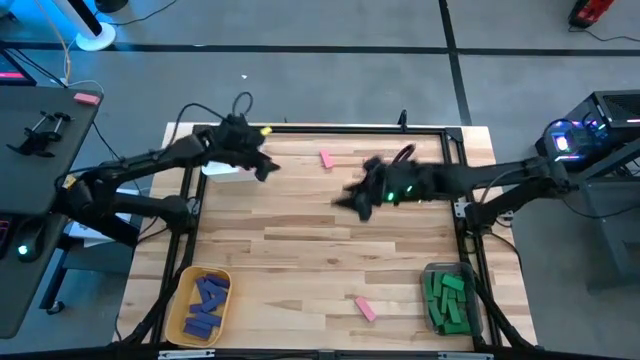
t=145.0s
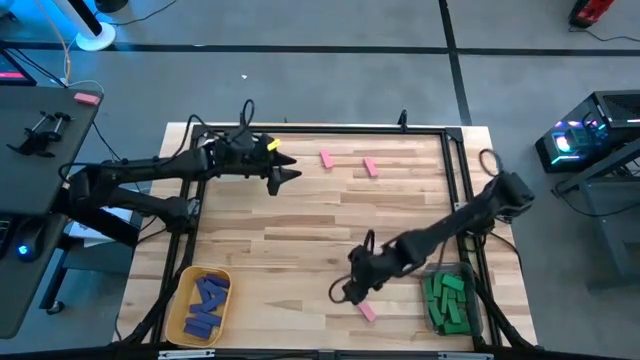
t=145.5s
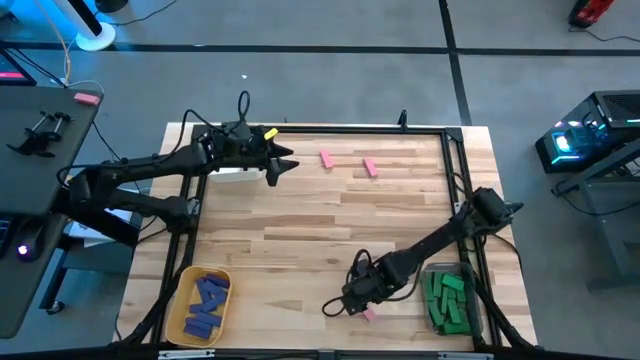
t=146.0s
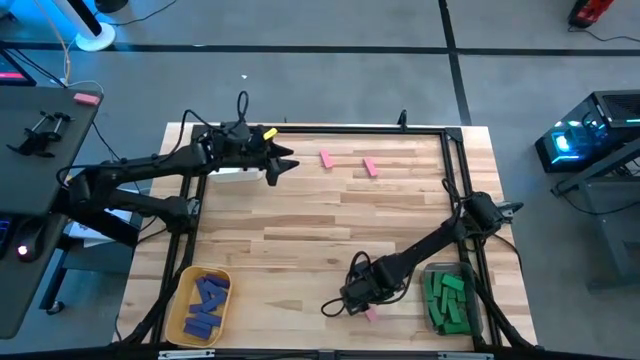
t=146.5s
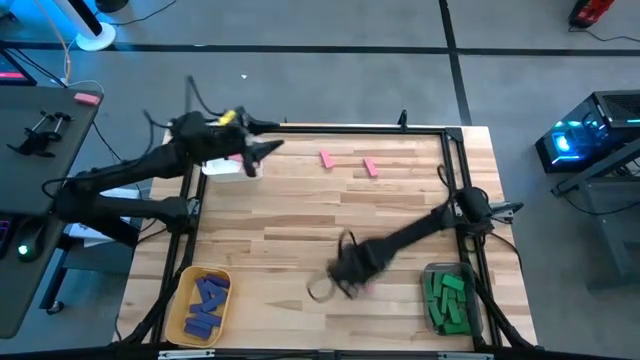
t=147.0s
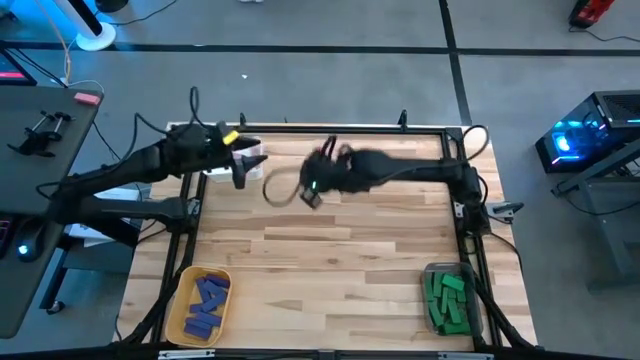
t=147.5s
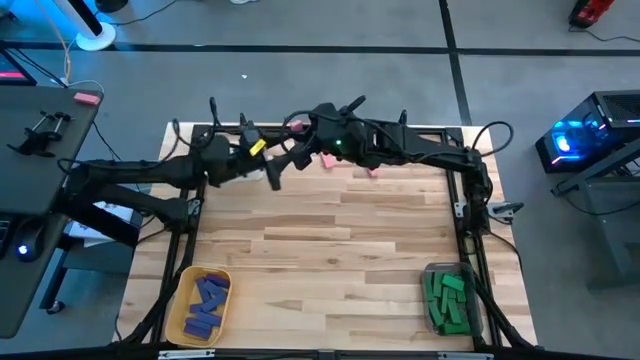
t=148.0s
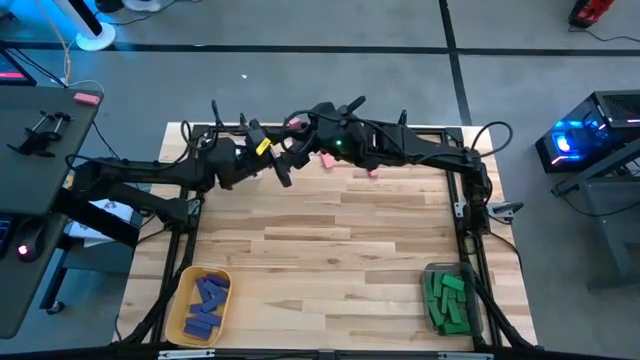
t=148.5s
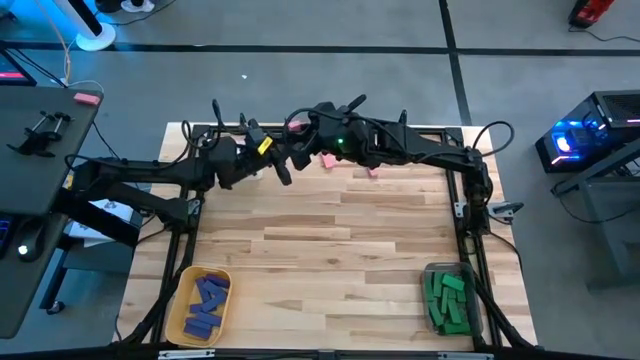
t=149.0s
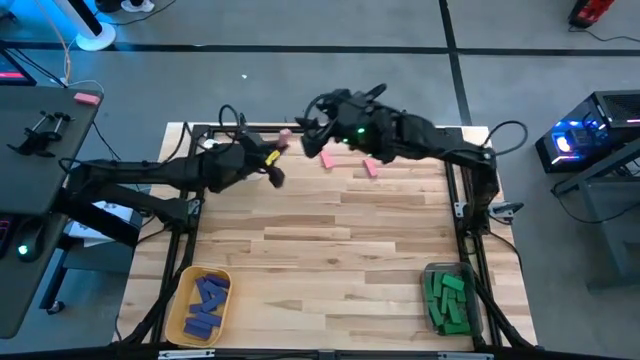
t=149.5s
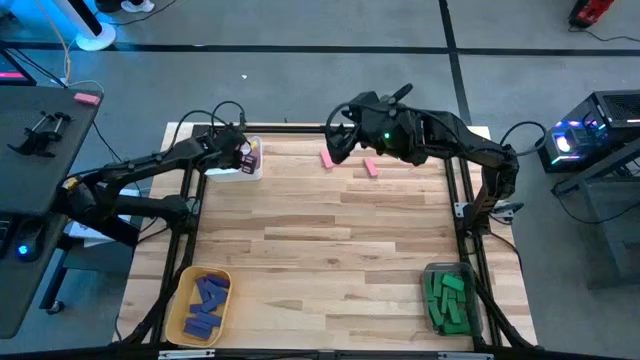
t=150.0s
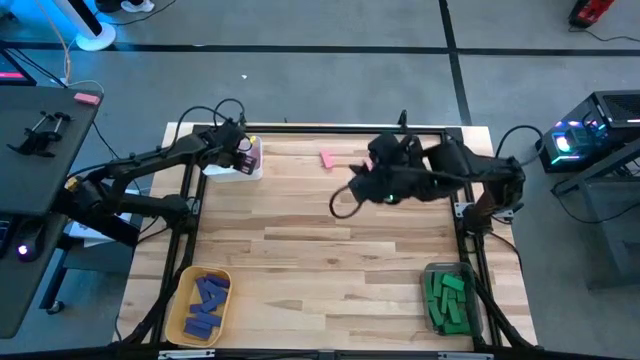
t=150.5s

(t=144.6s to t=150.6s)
Task: Sort blocks
Put the pink block into the white bin

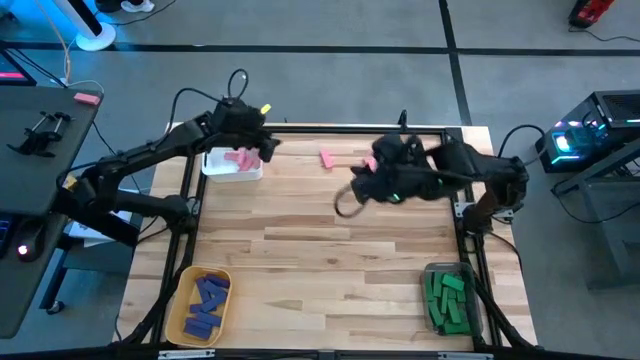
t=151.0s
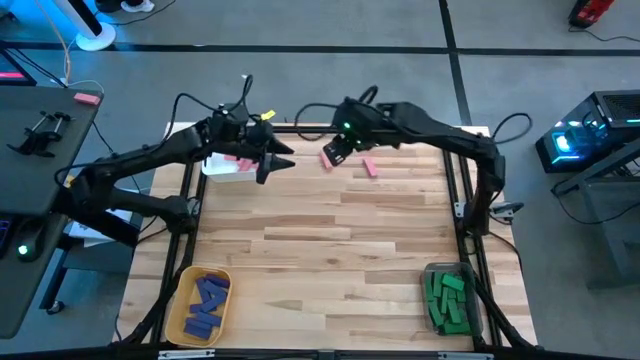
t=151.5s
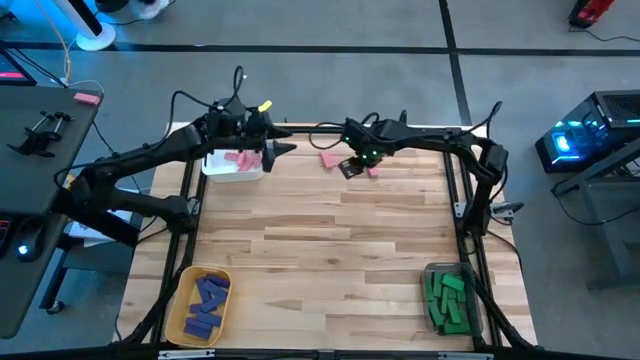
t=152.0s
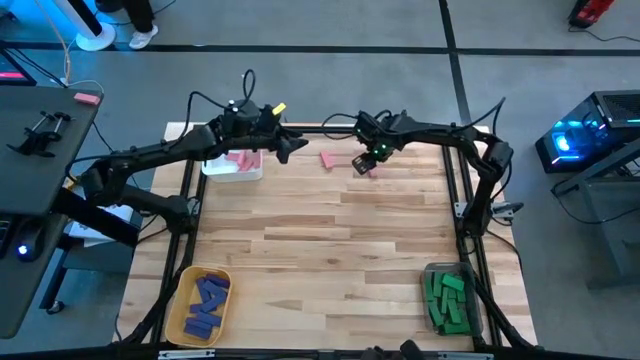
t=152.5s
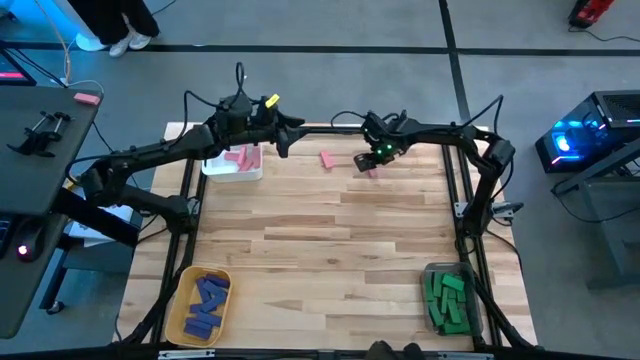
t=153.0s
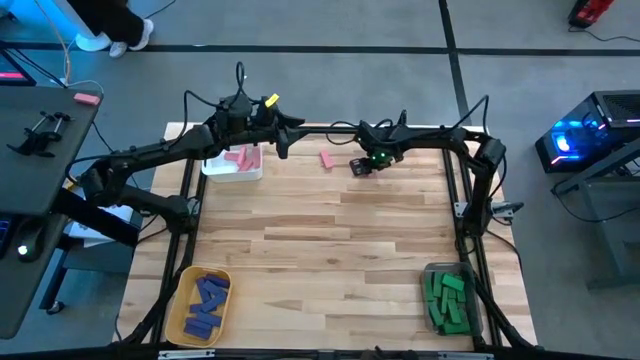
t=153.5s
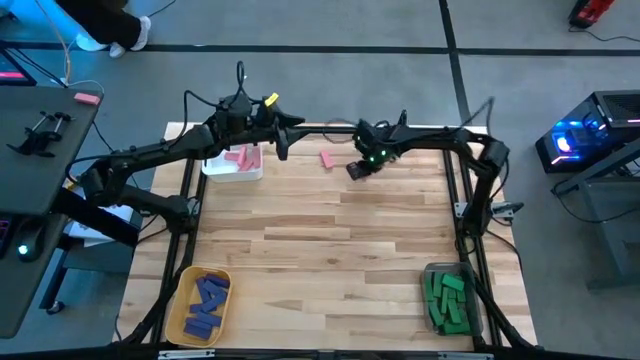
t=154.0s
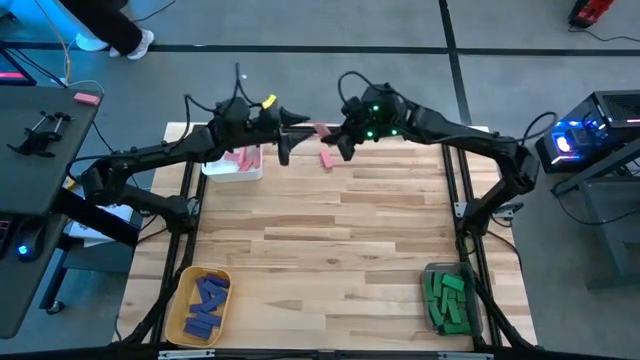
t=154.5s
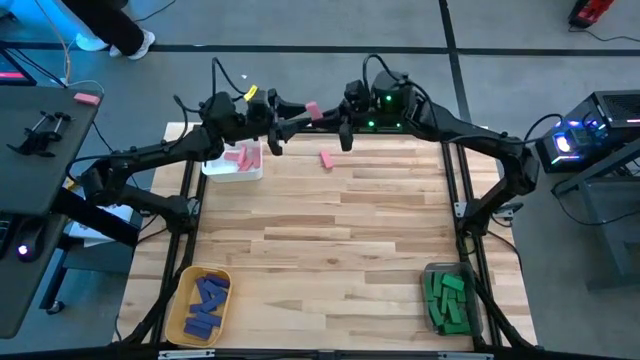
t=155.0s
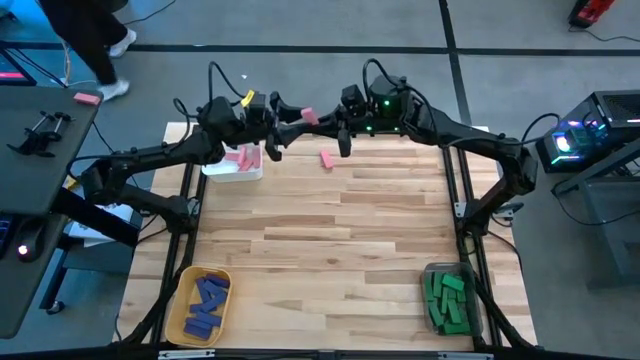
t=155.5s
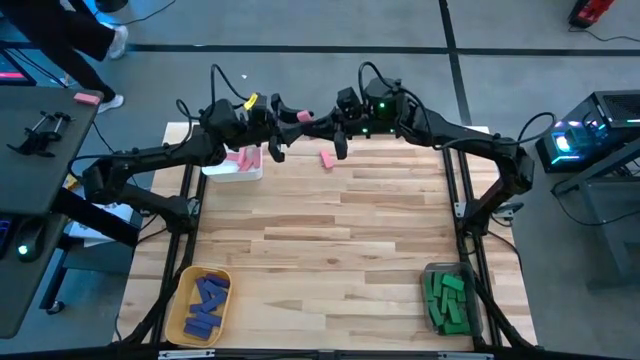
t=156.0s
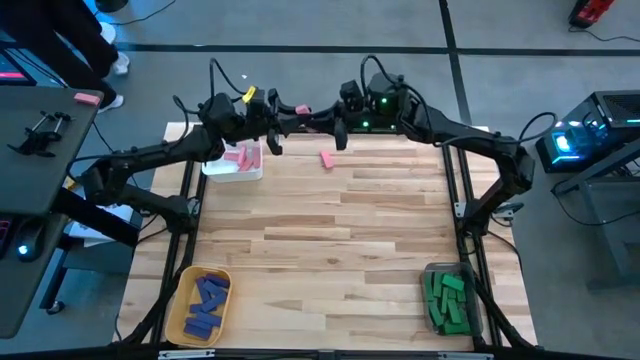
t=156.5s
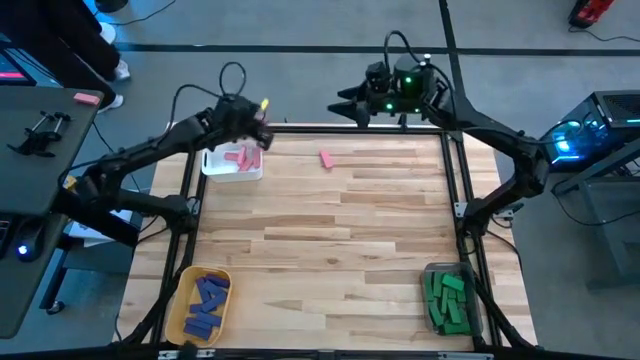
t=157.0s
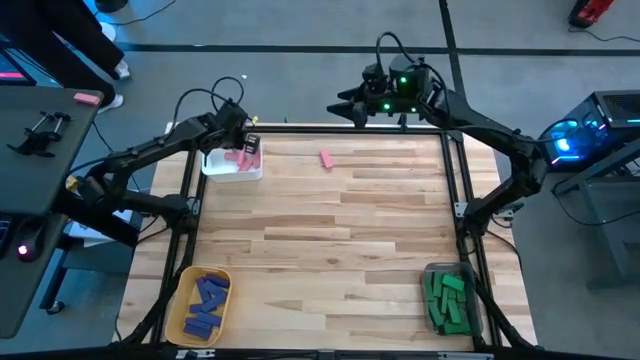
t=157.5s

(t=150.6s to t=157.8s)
Put the pink block into the white bin

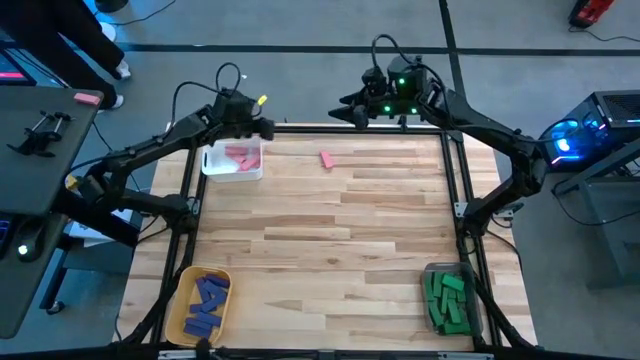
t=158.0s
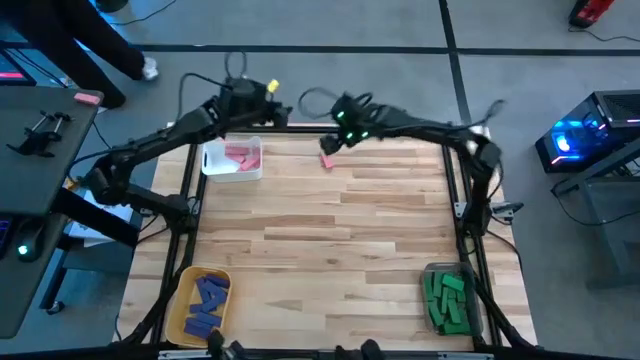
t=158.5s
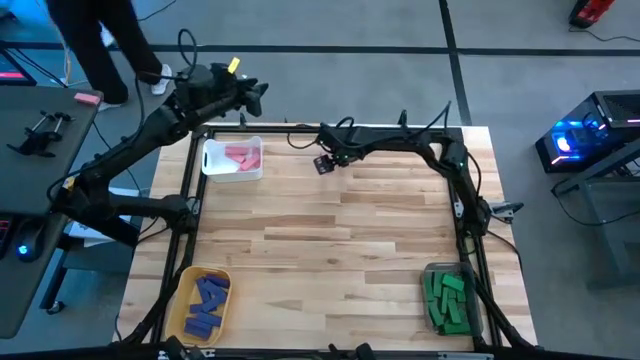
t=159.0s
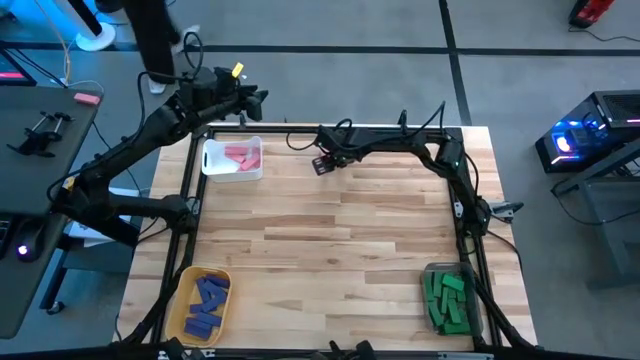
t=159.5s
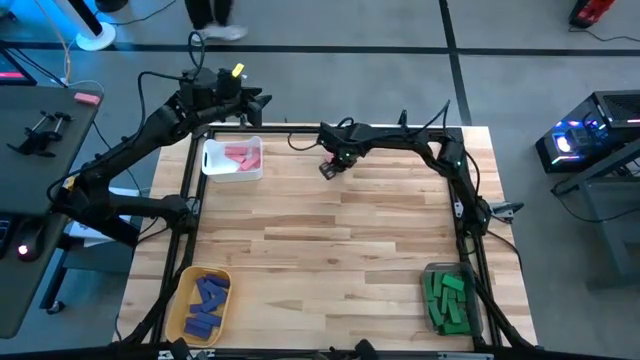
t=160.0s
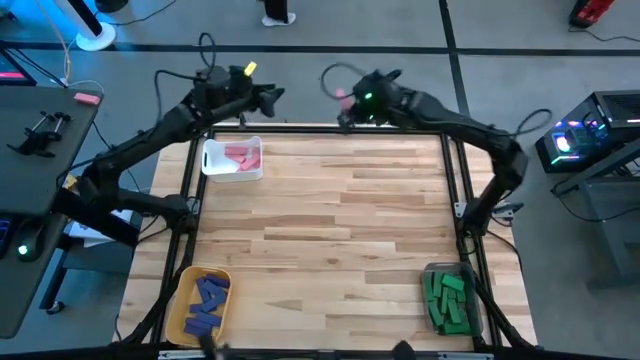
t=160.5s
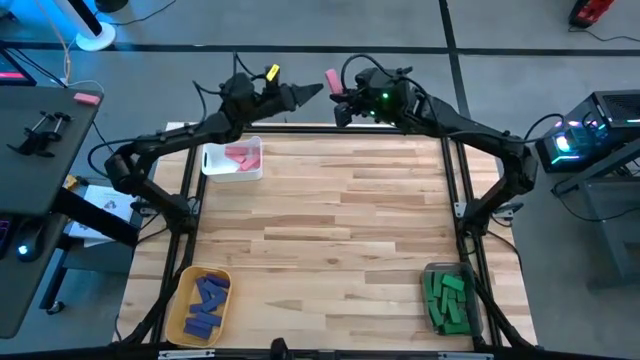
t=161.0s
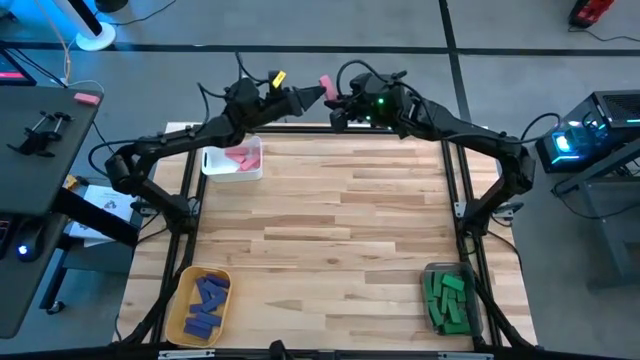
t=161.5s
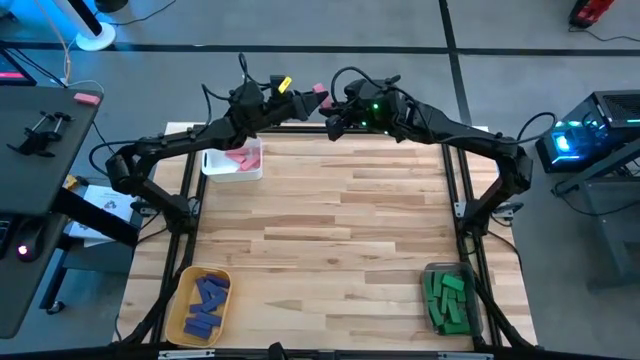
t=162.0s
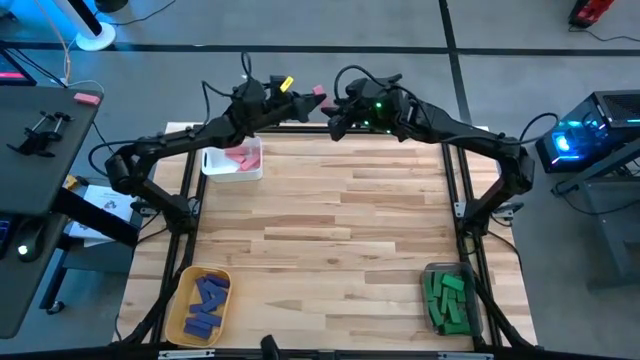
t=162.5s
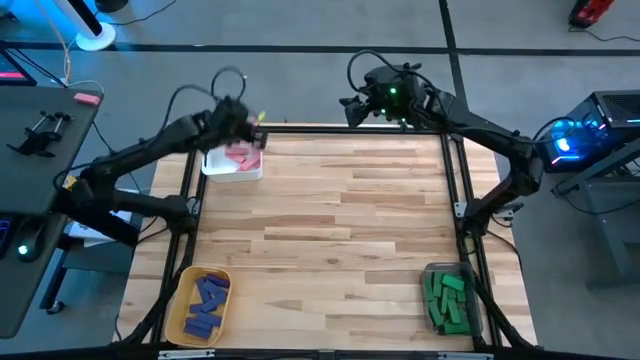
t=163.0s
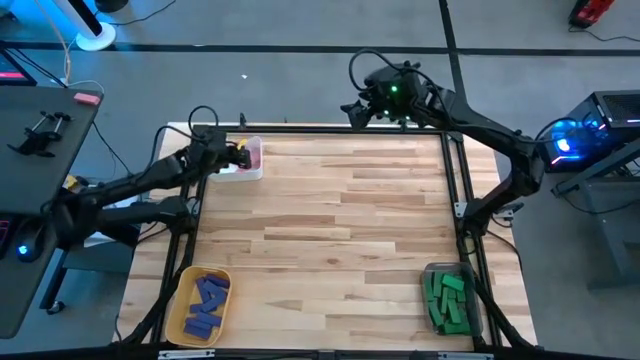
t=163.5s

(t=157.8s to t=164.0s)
Put the pink block into the white bin

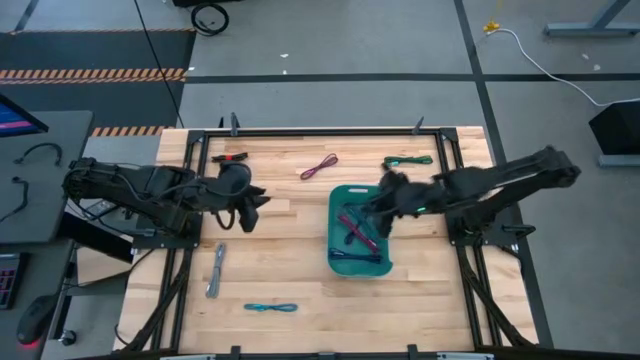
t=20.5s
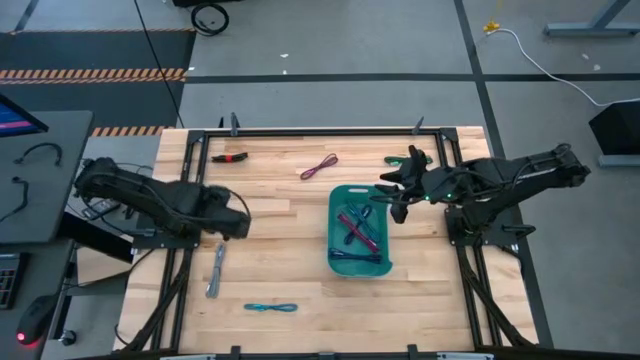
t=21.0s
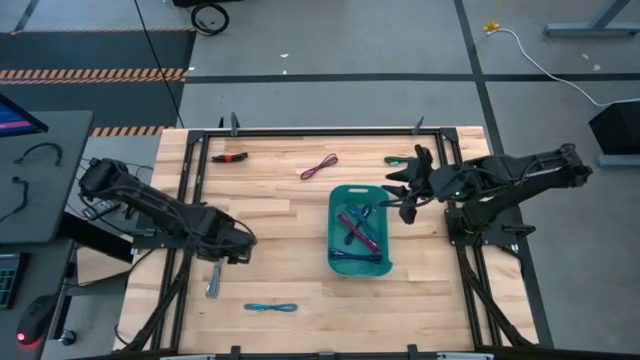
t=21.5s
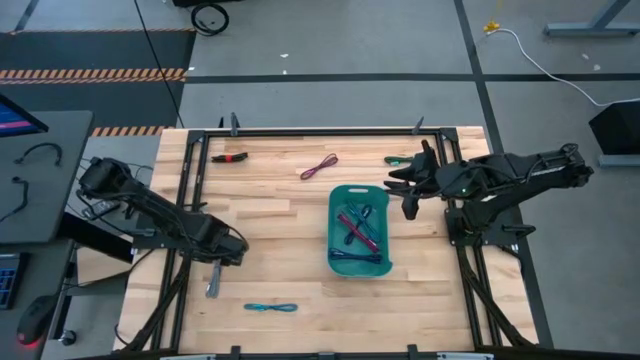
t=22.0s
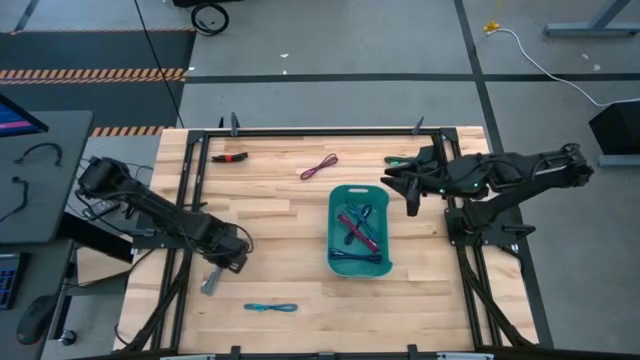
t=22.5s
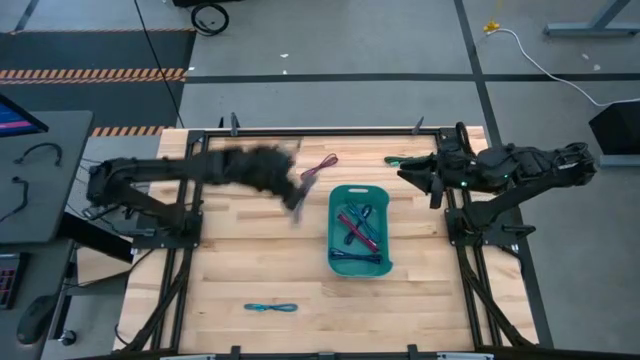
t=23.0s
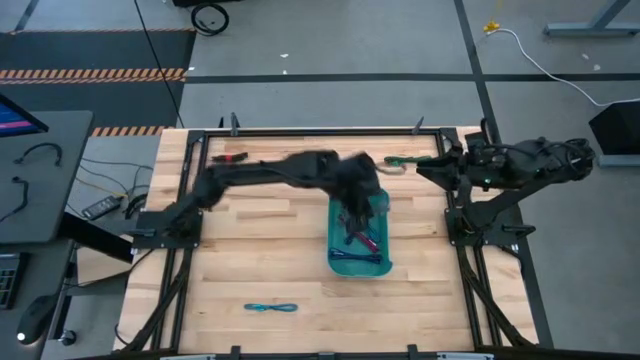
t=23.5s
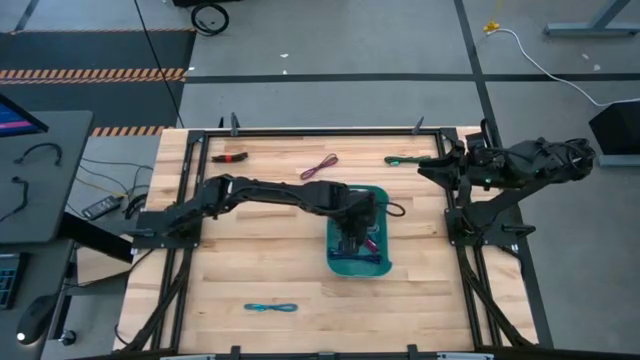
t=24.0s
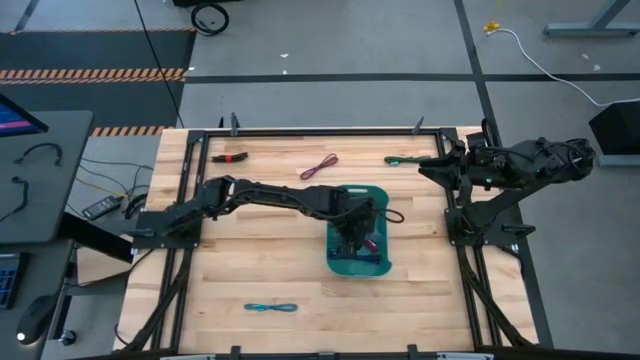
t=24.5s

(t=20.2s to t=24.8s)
Task: Pick and place USB-C Cables
Put the gray USB cable into the light green bin
